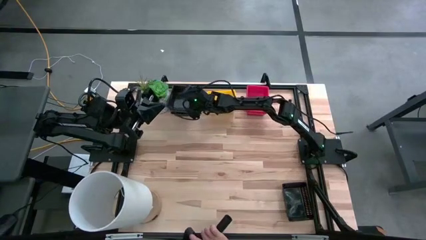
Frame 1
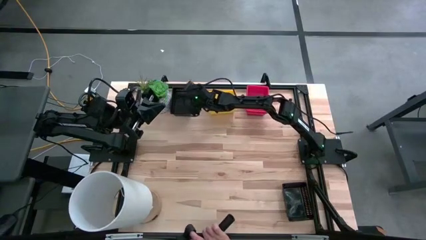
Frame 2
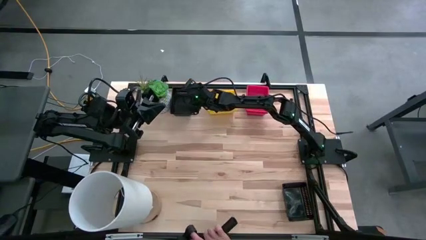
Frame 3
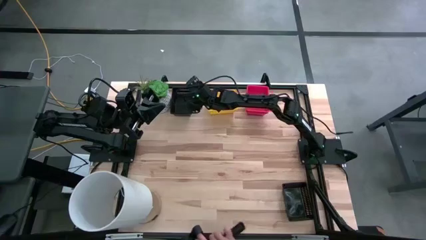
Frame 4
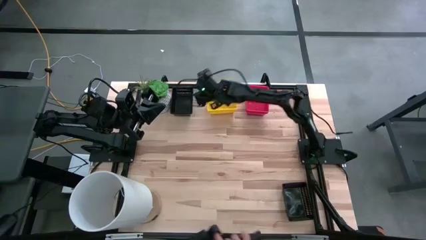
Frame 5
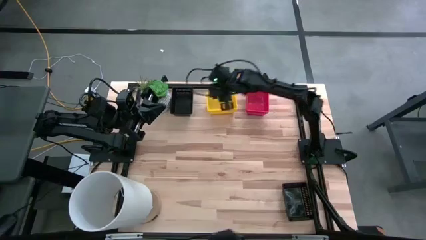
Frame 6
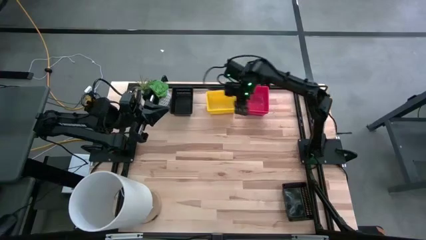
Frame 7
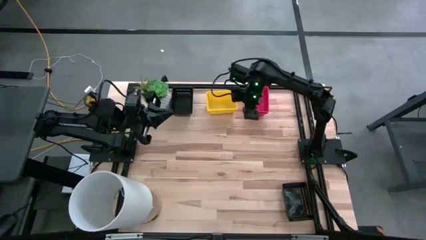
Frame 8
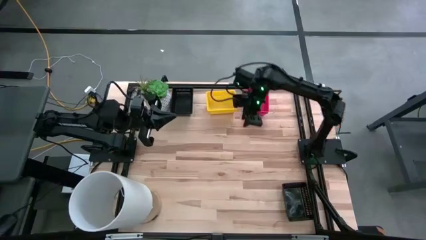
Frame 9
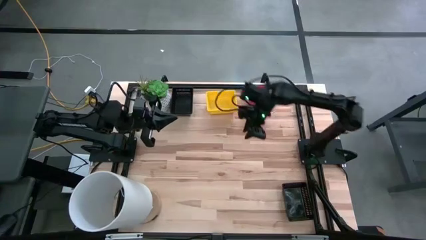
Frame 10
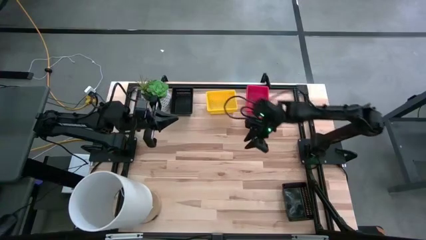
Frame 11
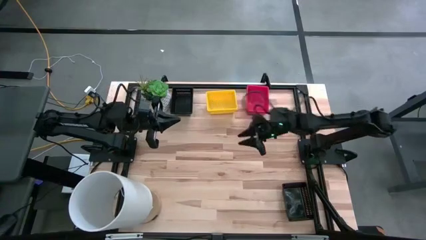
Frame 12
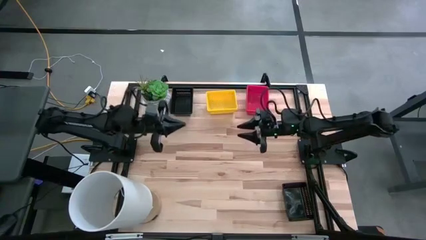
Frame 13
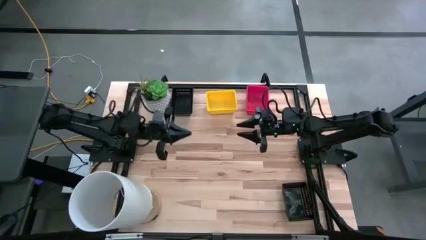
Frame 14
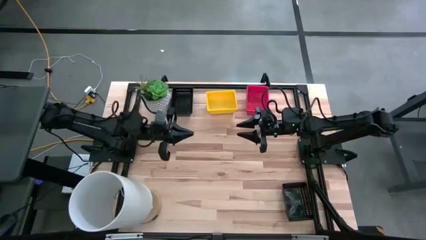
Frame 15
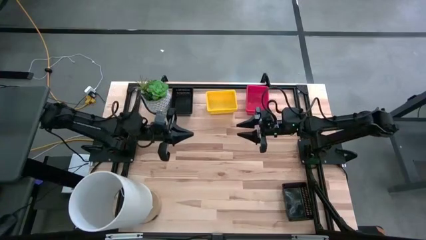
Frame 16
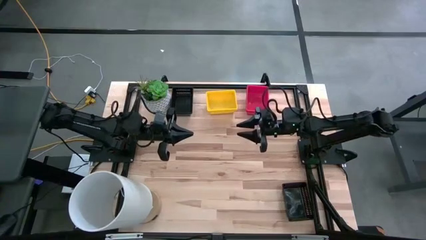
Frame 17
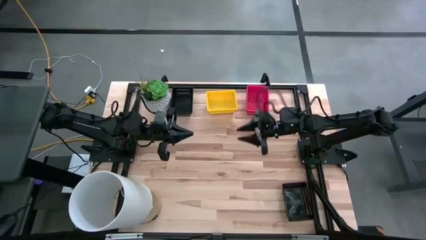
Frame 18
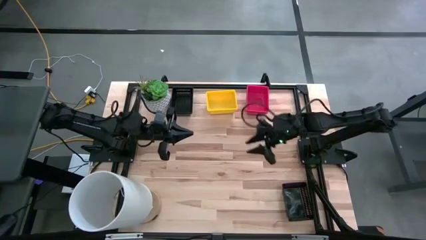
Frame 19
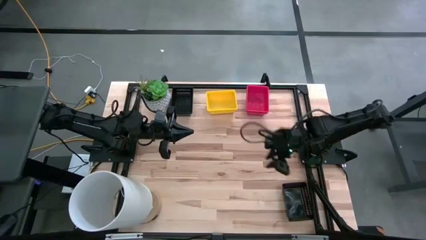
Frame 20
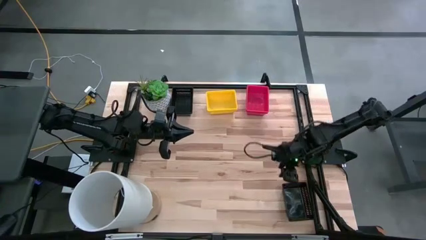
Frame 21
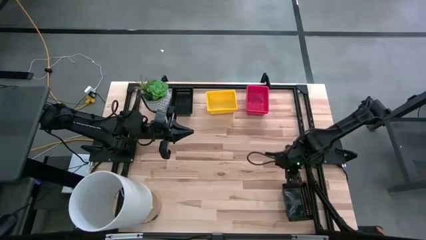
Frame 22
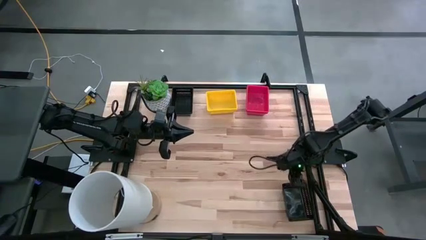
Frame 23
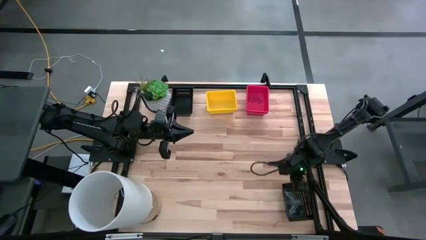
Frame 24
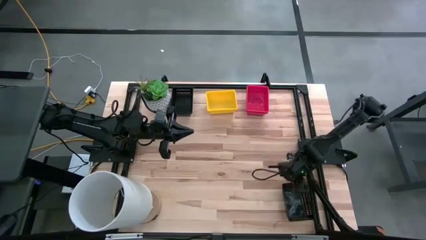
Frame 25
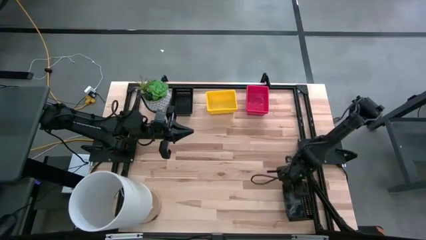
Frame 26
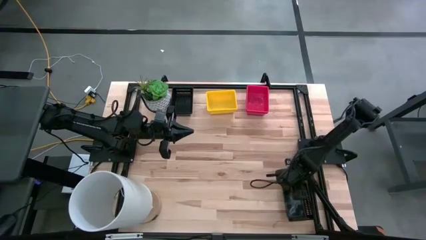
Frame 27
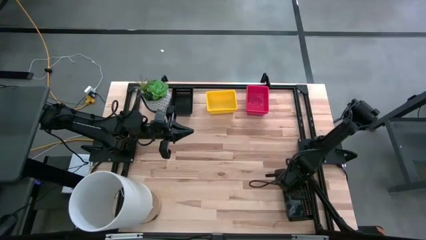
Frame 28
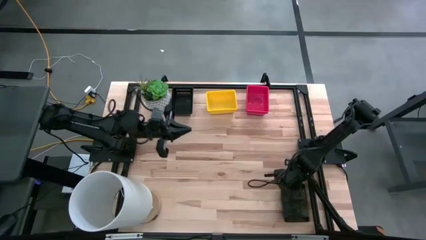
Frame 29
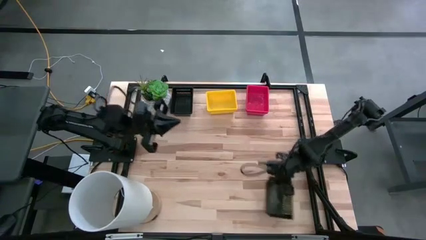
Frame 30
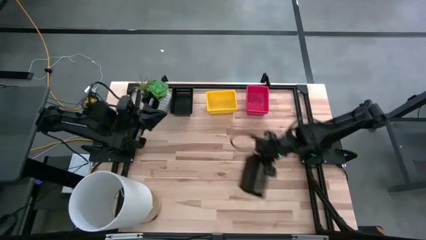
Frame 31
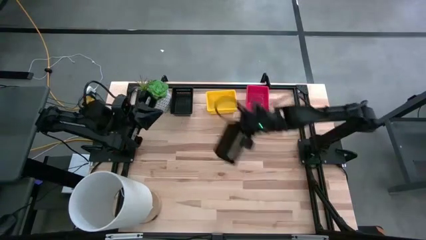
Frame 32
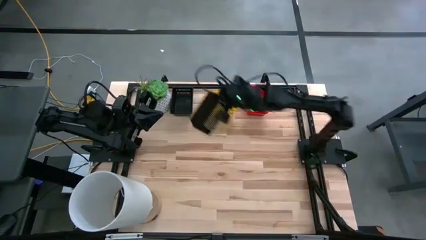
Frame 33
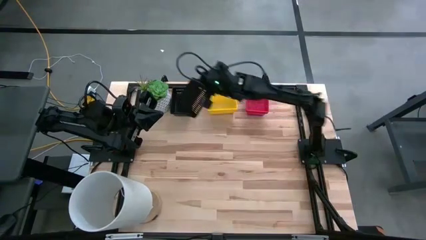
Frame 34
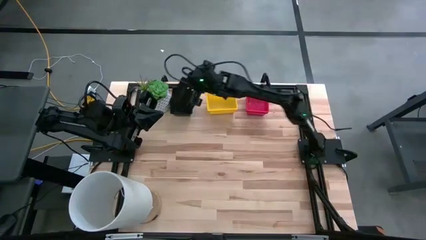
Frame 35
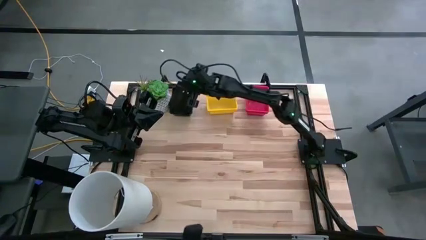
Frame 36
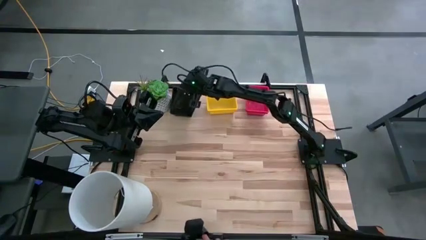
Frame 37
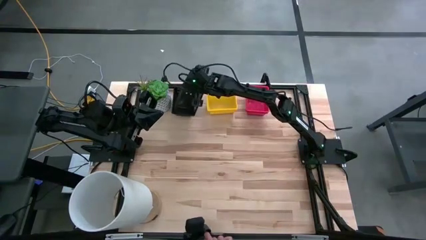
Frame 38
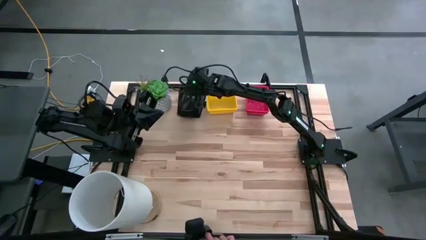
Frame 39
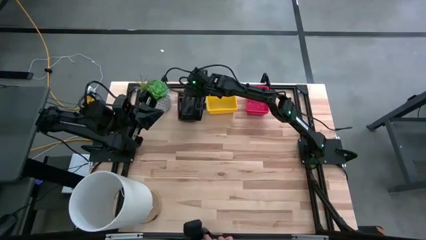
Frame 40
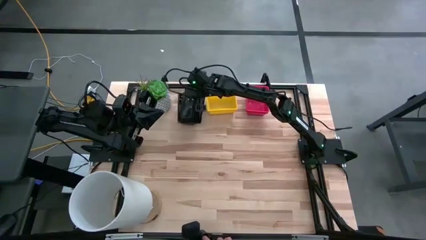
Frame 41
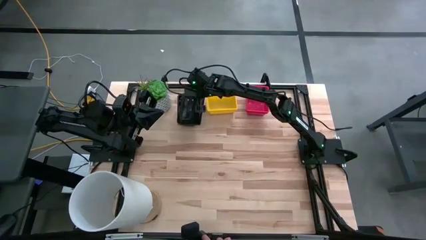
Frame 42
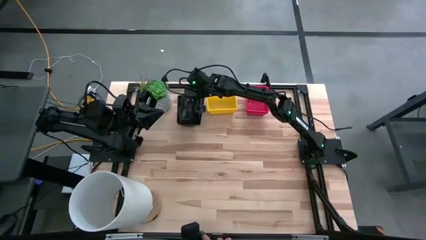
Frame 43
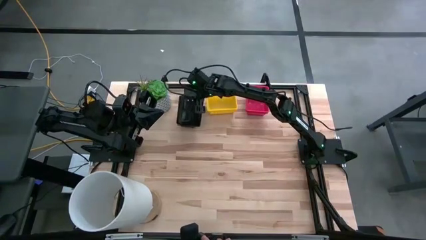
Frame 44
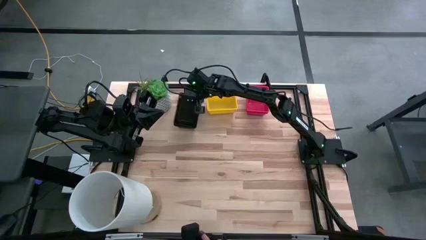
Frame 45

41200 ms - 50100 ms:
Stack the bottom black bin on the top black bin

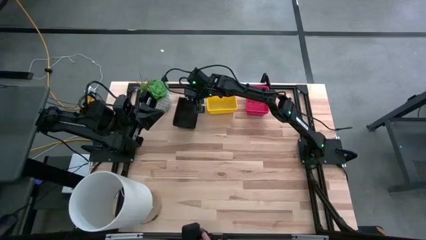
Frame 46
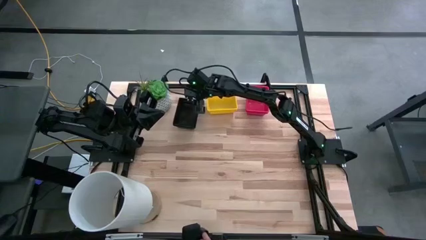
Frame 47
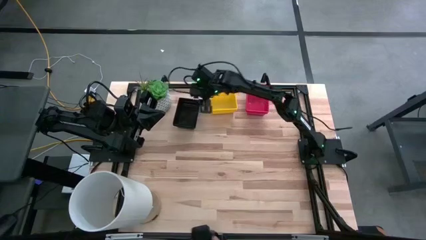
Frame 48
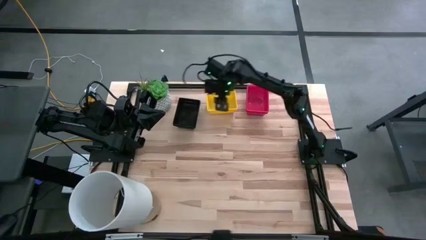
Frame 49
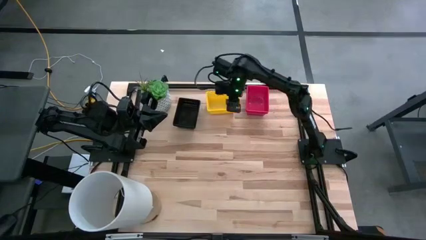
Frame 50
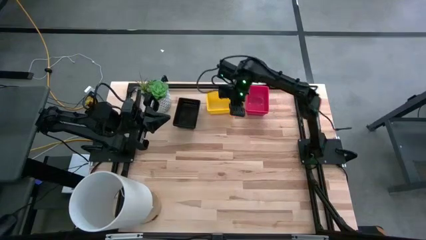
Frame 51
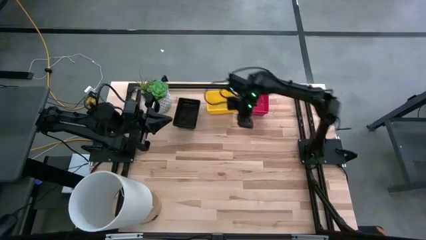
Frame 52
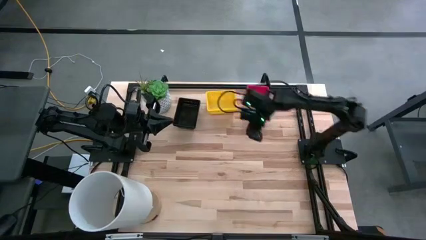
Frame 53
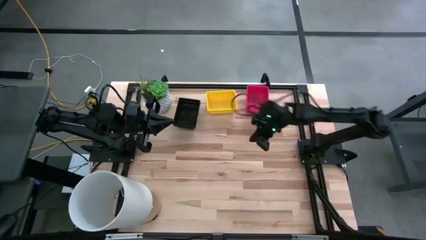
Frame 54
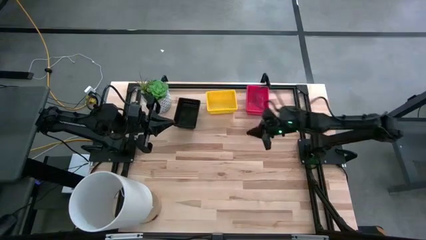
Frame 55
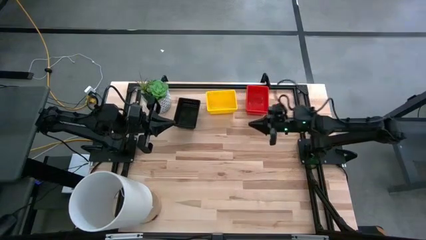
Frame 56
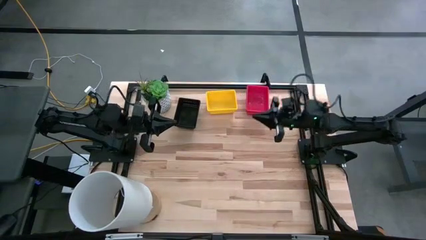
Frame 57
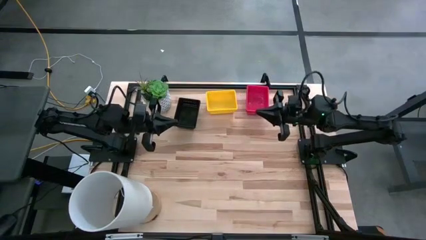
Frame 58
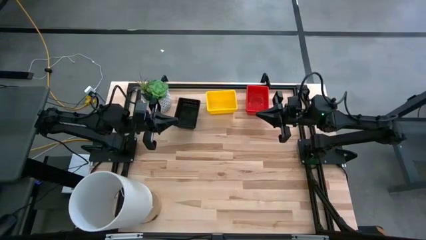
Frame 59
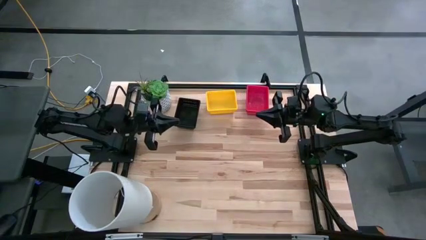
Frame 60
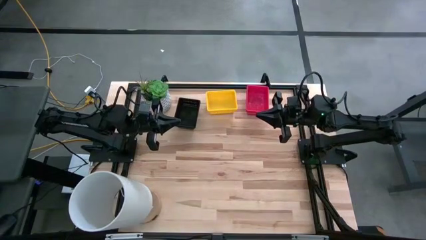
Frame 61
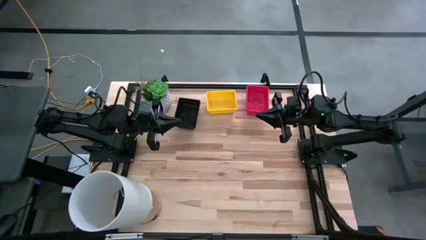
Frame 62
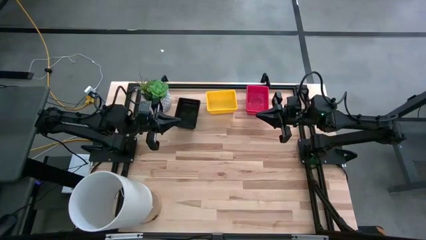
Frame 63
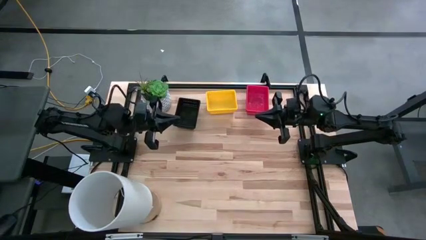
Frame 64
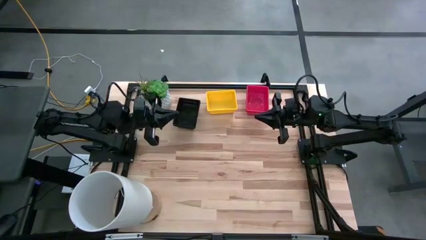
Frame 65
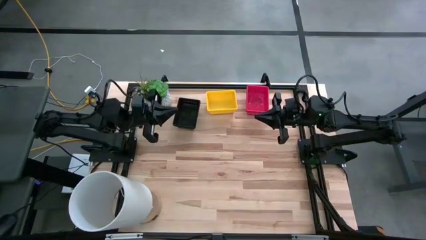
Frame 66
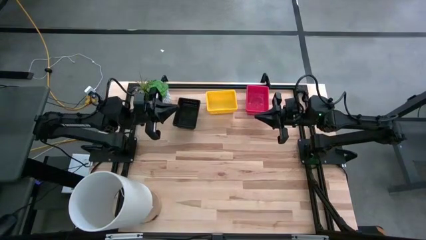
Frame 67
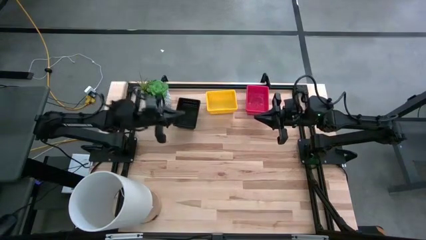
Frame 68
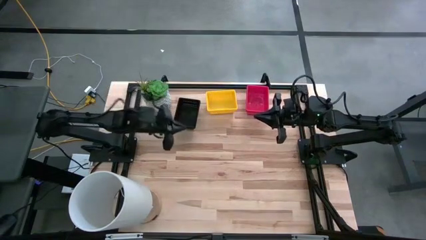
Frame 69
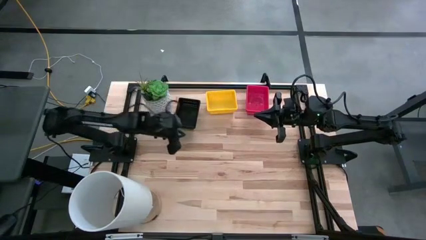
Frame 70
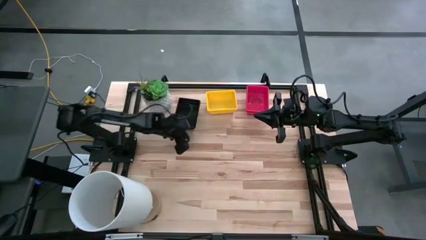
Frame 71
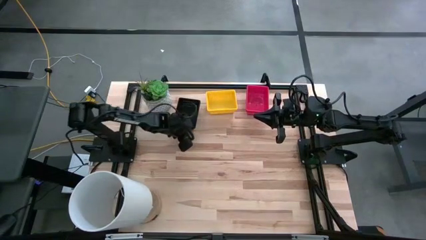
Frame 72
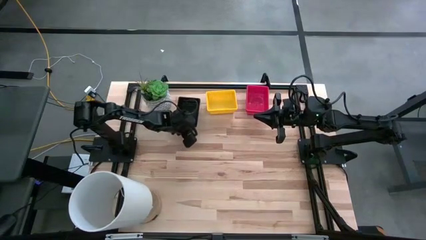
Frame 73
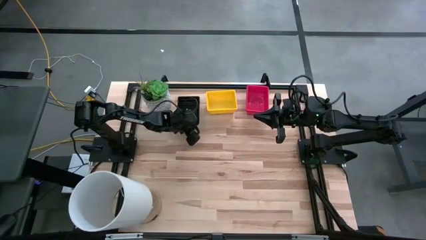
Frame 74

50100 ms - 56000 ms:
Adjust the stacked black bins

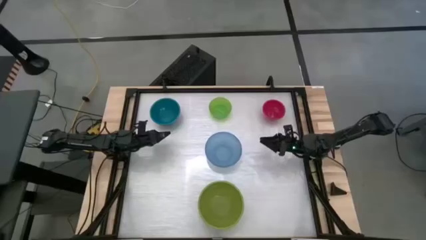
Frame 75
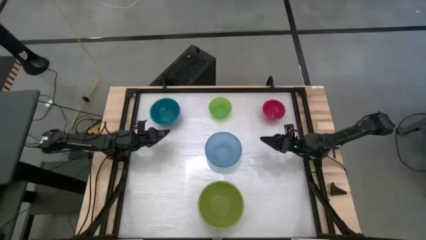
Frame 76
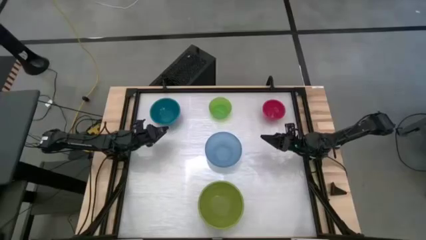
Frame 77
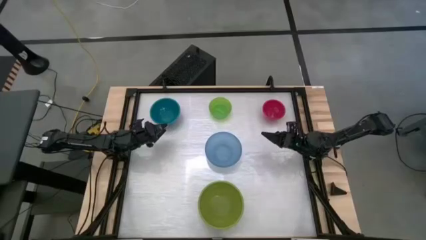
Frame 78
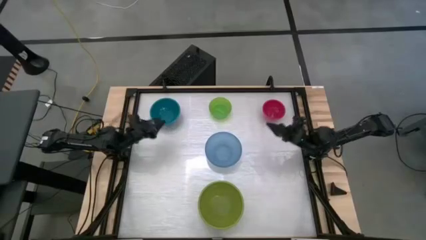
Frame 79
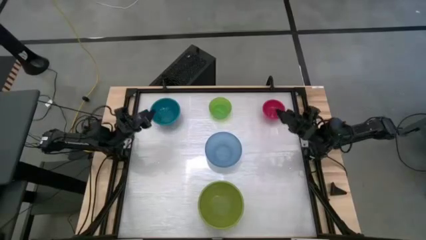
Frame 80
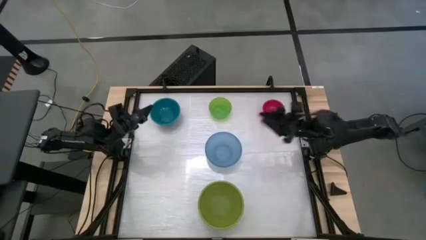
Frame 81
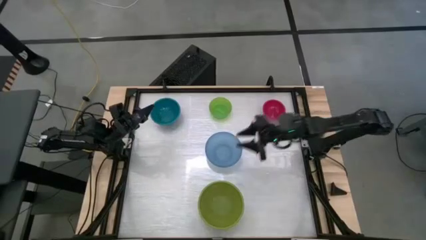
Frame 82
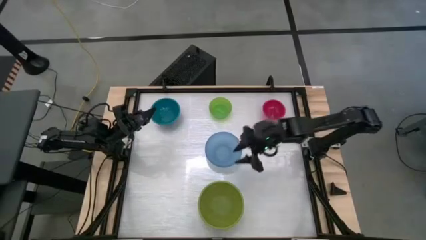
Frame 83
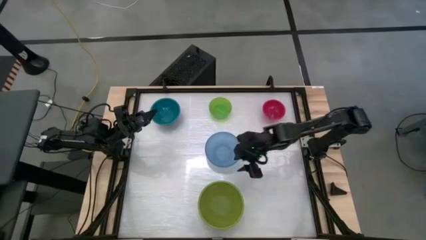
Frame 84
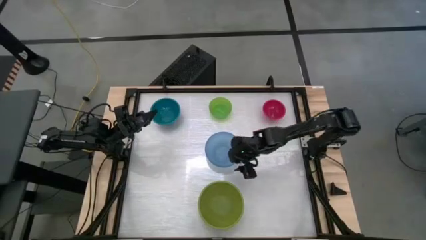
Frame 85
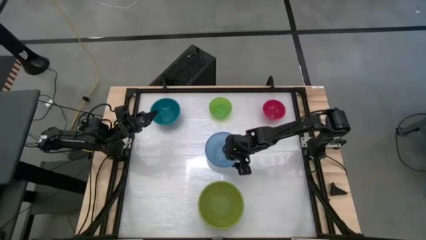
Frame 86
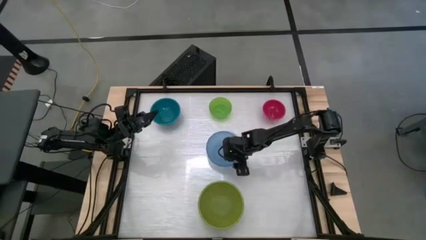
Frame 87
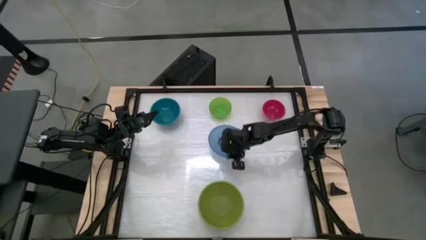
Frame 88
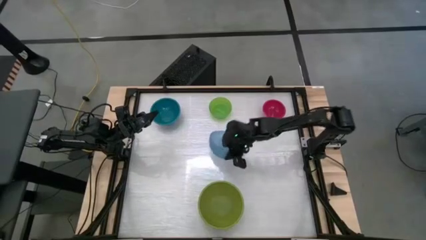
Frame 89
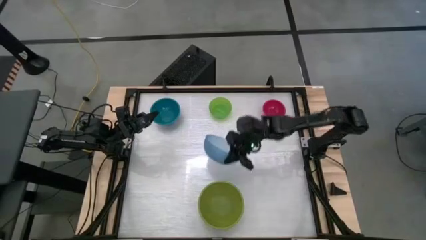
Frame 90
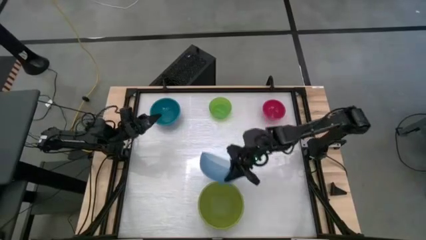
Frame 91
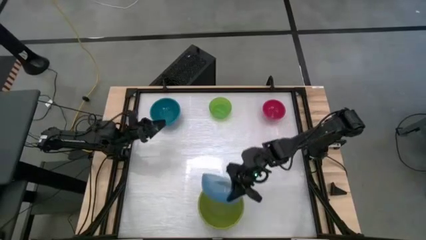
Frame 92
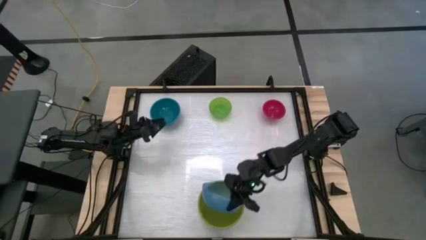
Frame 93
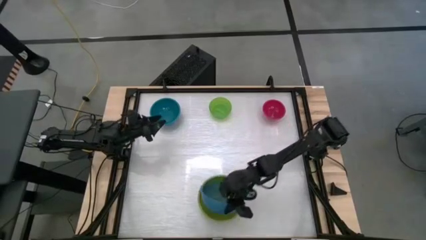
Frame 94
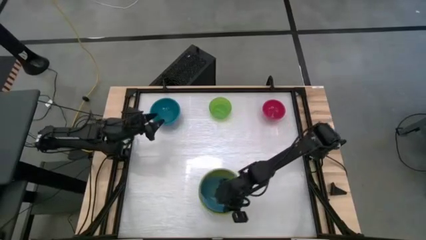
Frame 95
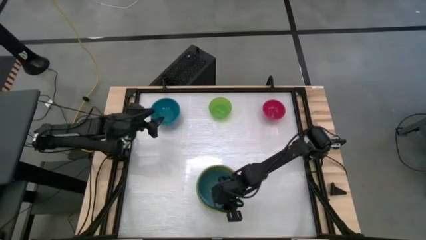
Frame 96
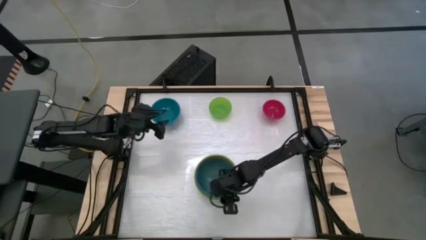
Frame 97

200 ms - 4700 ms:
Stack the blue bowl on top of the green bowl
